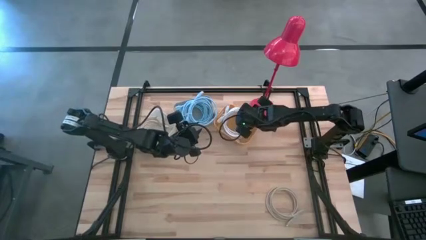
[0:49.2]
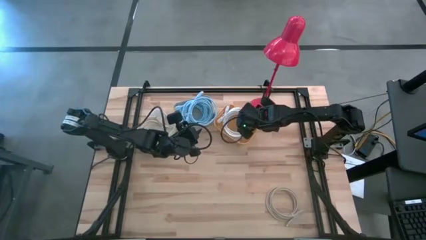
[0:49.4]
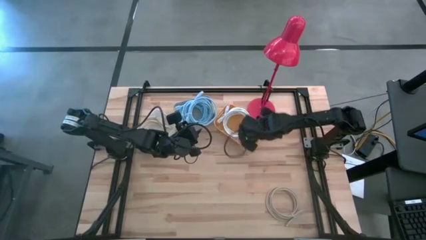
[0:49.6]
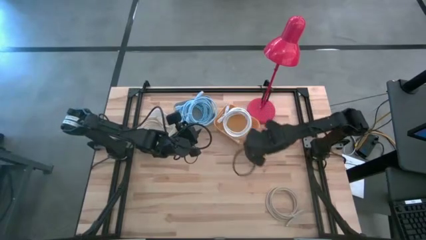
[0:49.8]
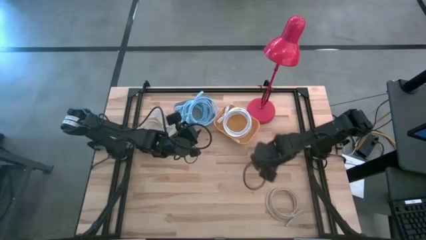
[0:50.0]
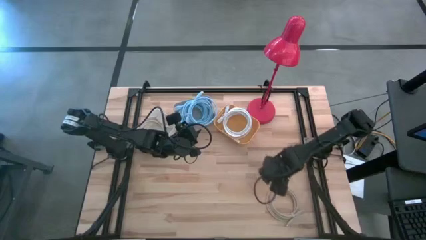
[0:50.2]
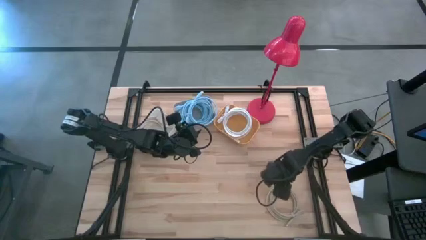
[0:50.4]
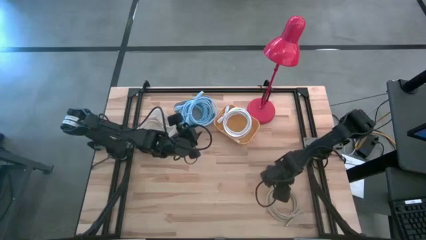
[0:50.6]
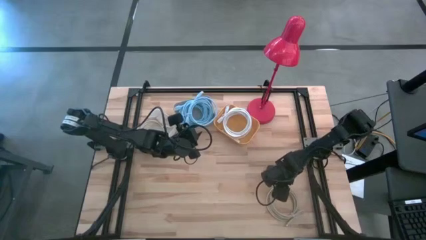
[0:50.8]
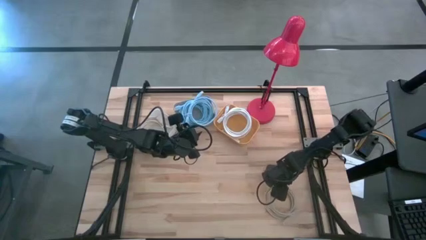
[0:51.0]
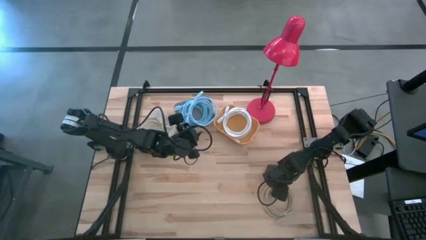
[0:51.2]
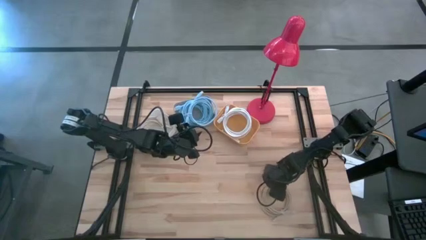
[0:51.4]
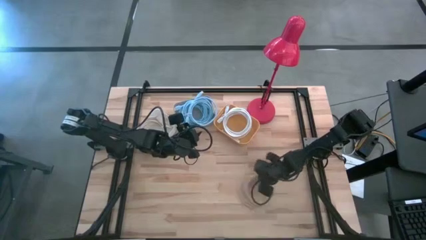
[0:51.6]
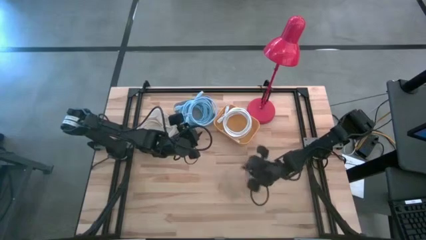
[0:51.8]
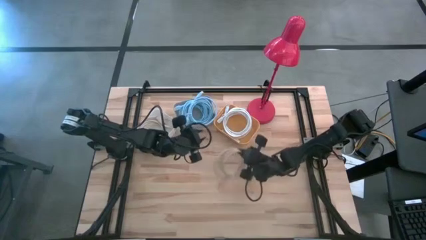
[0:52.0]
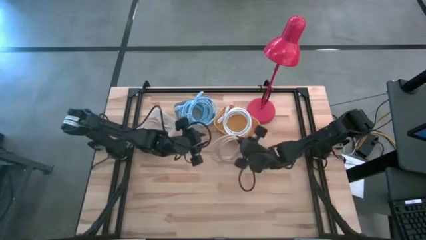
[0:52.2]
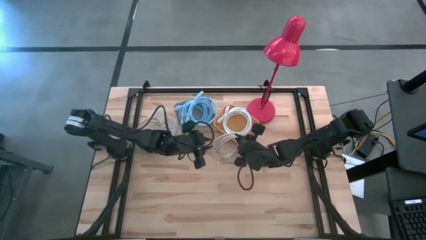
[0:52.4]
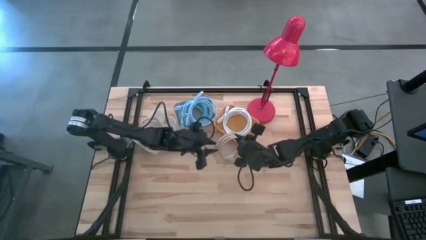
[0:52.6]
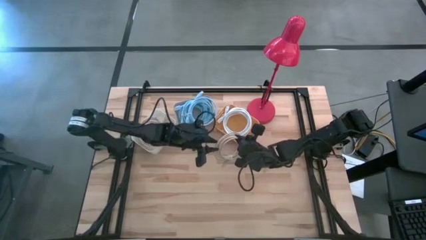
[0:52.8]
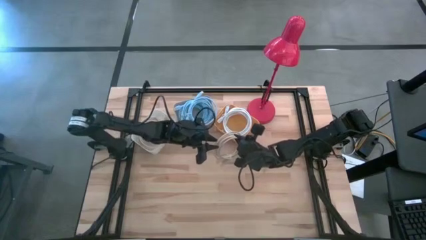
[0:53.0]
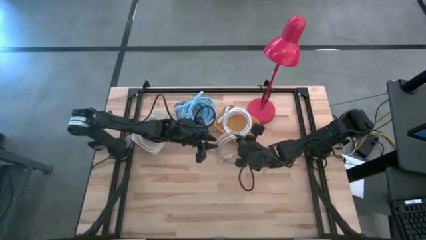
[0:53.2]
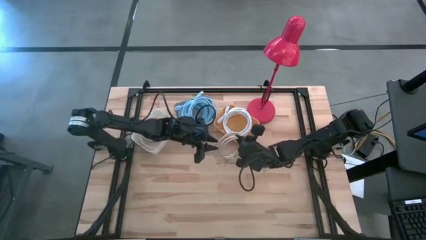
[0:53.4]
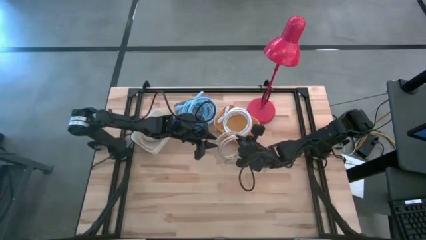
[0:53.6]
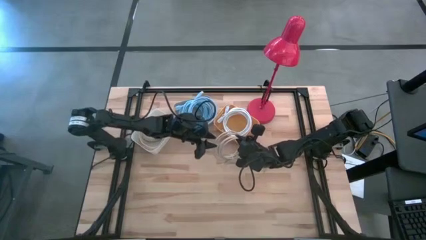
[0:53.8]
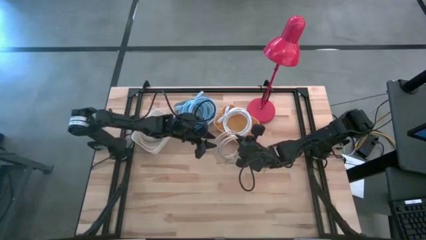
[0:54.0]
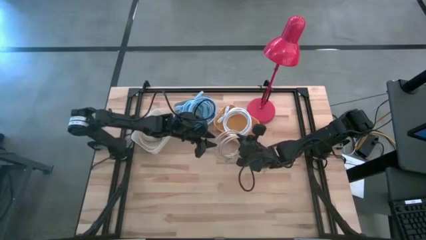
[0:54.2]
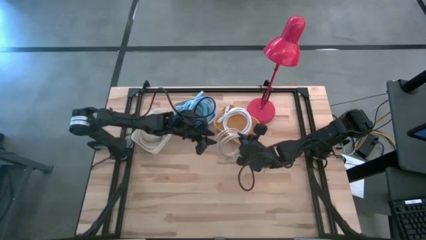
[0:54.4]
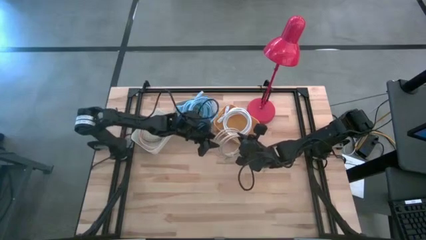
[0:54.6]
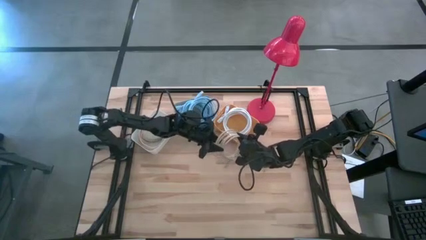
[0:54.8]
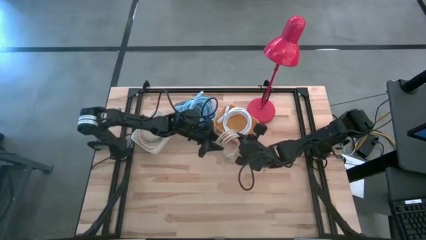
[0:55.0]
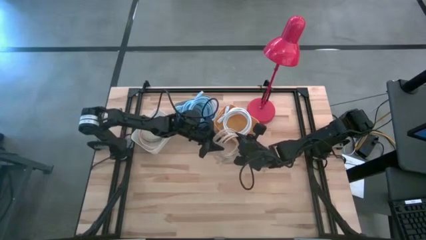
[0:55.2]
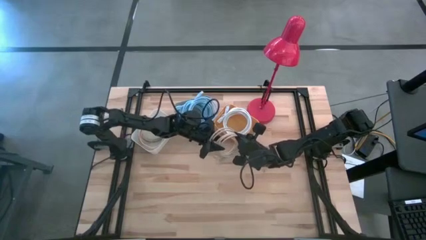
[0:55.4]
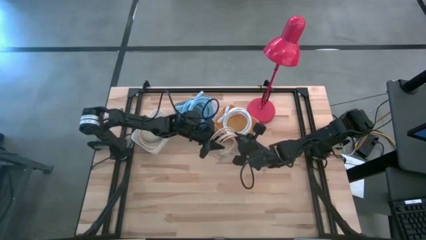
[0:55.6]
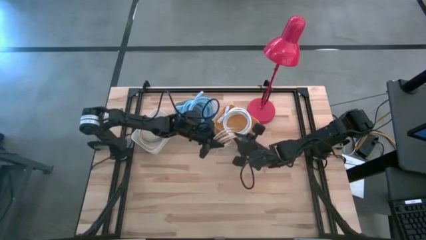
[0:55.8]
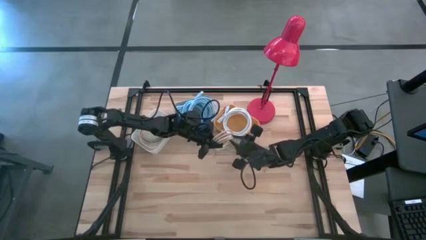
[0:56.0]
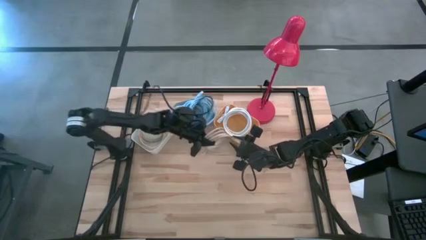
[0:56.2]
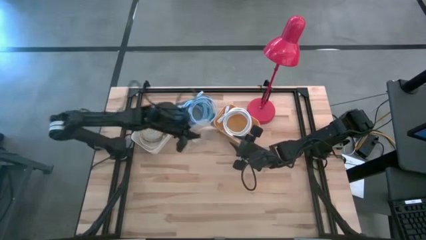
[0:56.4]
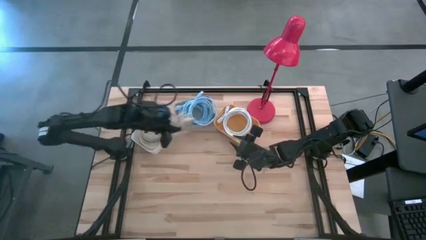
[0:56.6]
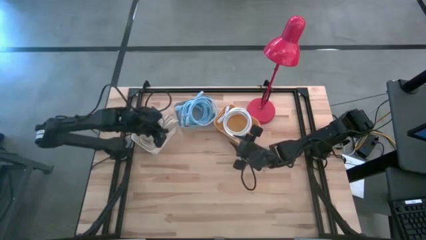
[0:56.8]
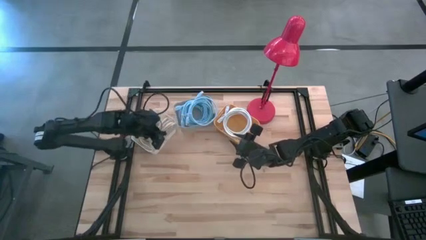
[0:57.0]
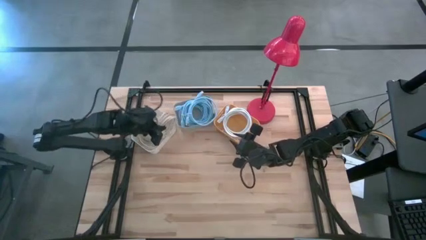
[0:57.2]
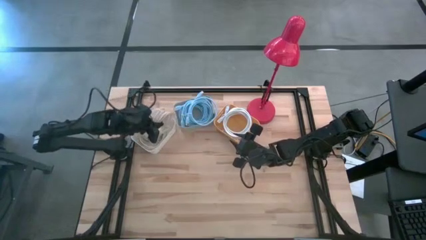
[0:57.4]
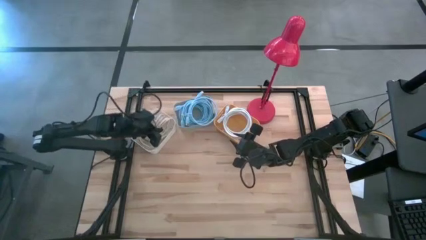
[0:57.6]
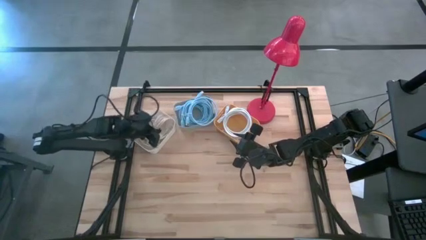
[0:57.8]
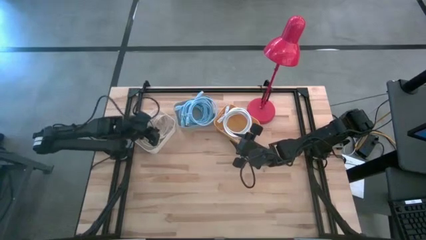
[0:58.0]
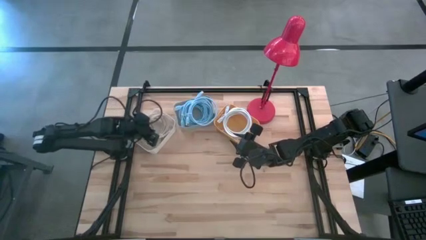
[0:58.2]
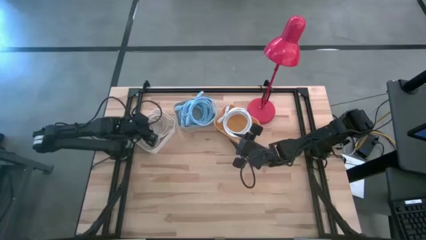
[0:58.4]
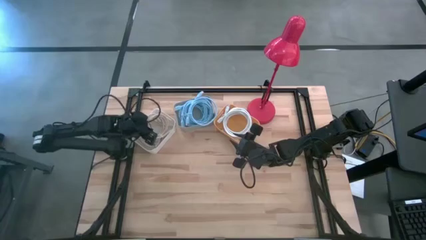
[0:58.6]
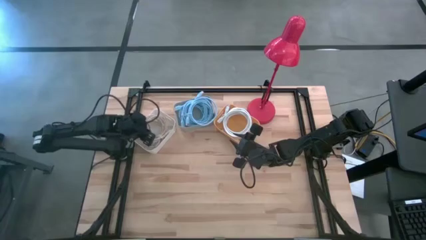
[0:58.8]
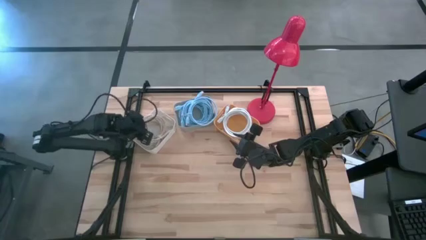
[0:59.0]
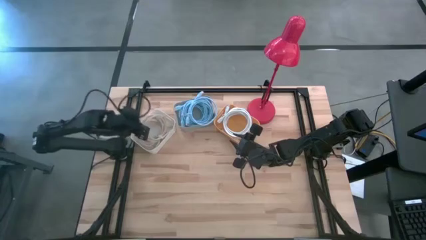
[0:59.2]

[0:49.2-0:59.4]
Task: Sort HDMI cables
Put the brown hdmi cable into the white bin

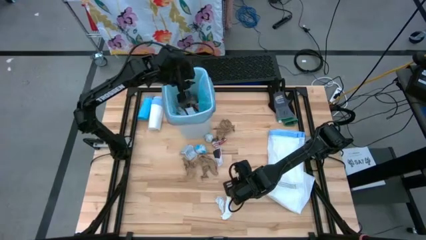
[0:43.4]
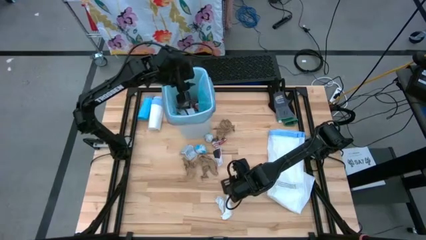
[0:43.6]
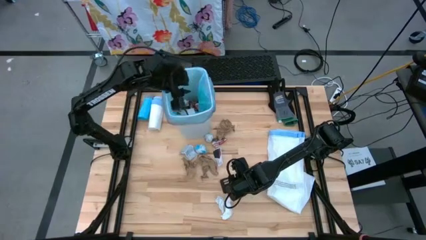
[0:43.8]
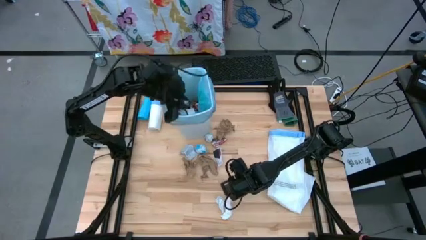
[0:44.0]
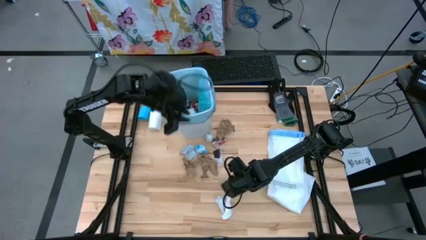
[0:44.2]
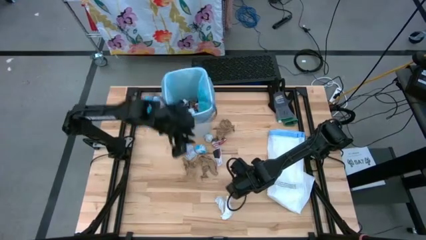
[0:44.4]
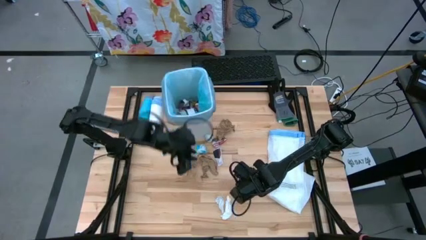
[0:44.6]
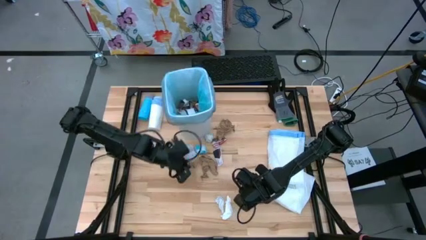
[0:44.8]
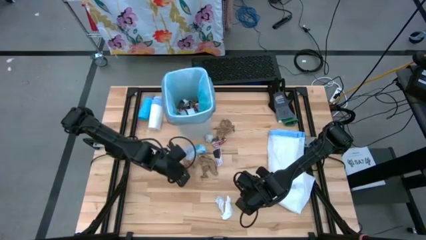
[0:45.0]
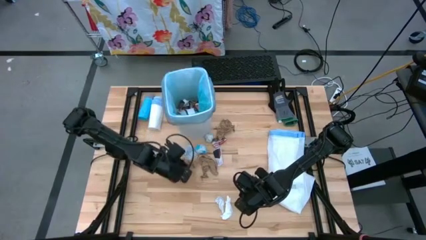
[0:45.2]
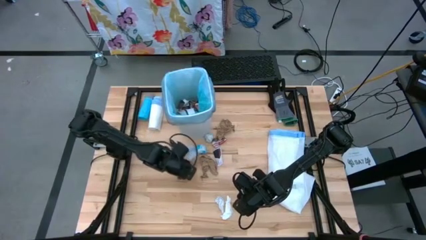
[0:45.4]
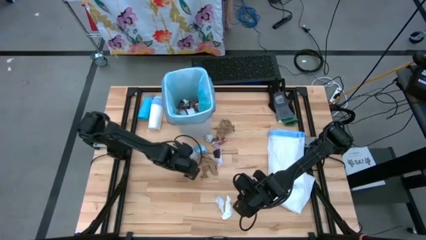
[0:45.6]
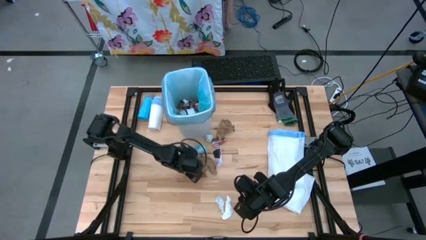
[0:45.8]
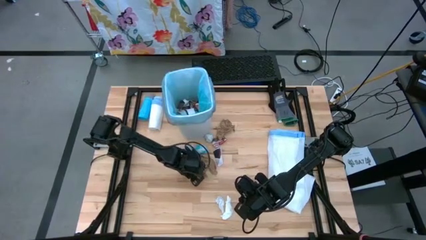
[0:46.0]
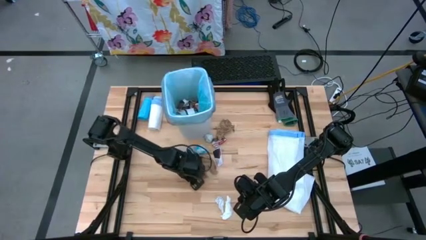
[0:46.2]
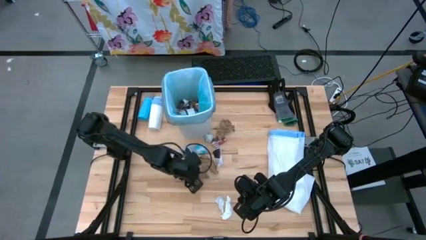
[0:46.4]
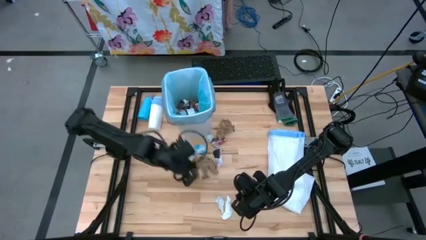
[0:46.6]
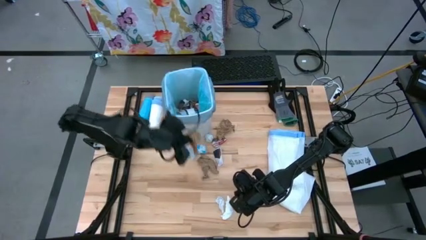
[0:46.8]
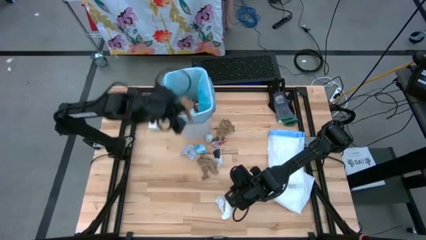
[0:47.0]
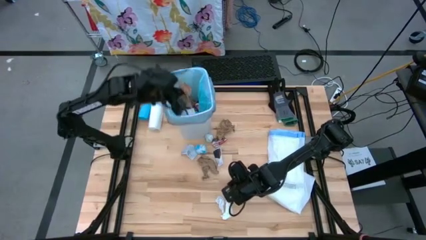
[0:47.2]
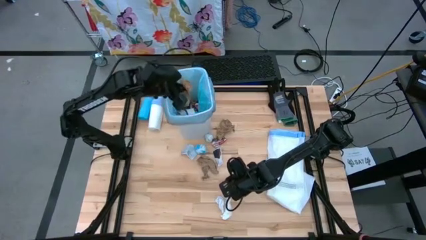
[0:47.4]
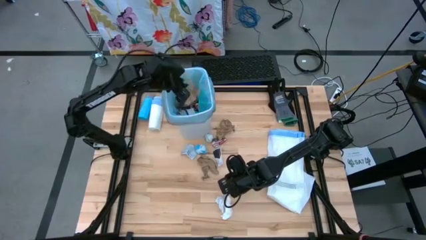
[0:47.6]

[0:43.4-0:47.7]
Task: place trash/remove bag and relplace
Put the brown napkin into the white trash bin

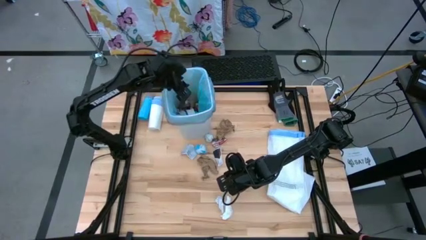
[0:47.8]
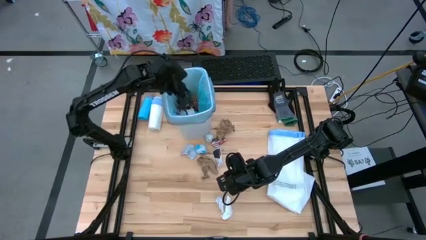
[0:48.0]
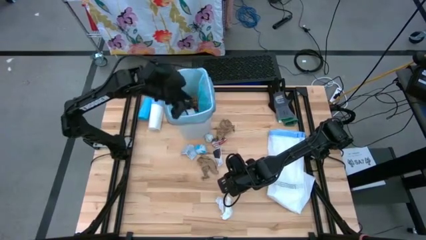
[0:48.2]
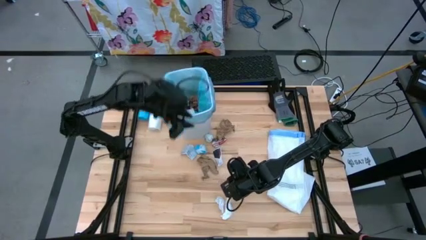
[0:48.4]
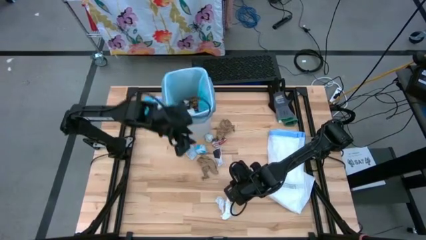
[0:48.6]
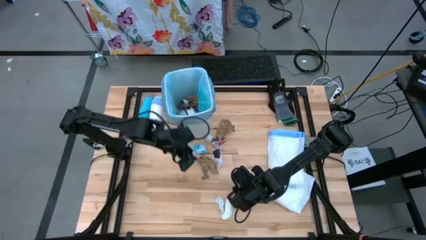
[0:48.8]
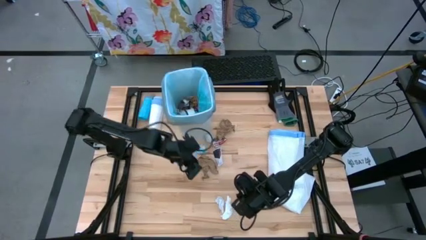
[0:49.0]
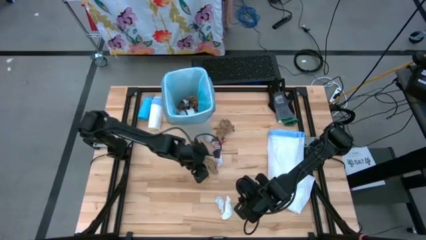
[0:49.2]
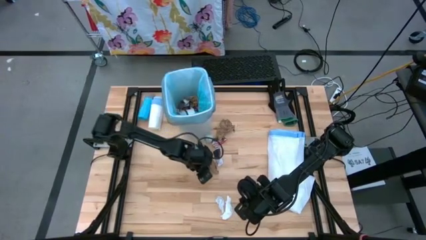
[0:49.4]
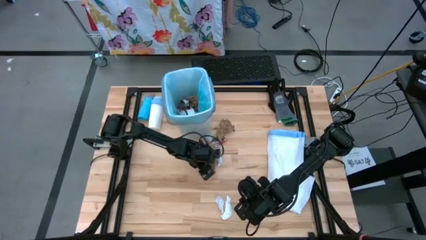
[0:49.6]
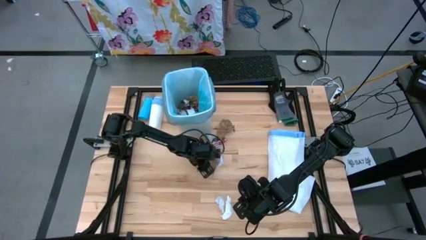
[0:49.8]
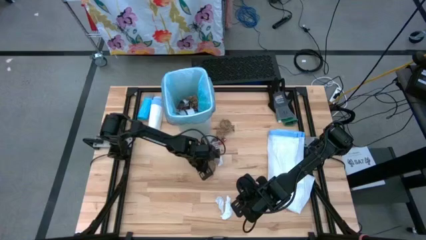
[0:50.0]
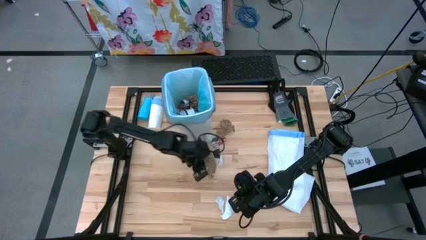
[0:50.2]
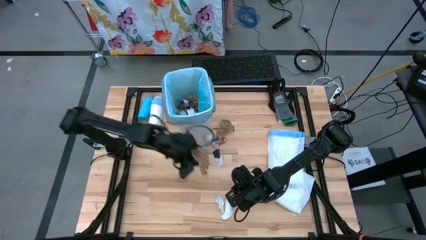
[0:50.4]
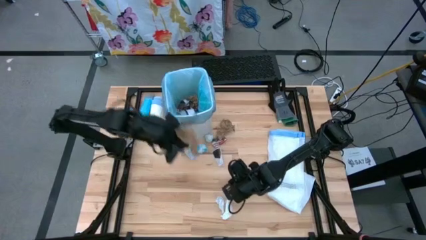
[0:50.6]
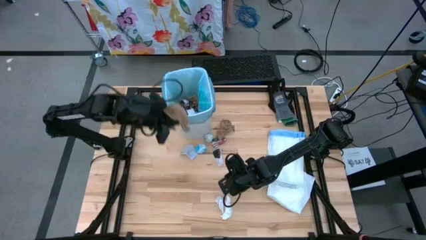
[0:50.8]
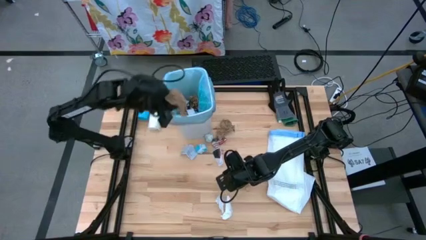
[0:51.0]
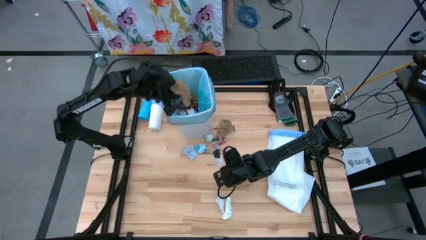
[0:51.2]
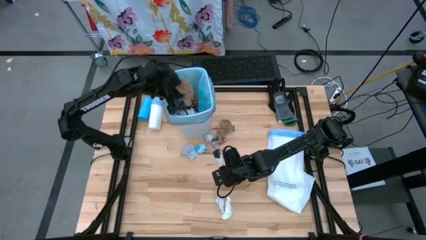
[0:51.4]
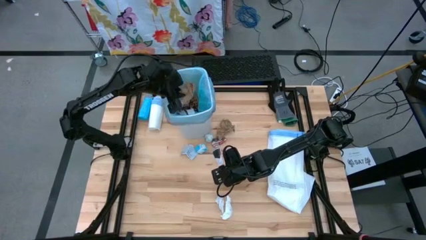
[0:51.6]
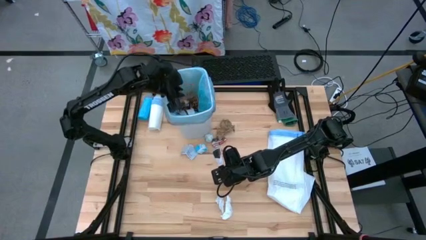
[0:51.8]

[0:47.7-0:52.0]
Put the brown napkin into the white trash bin
